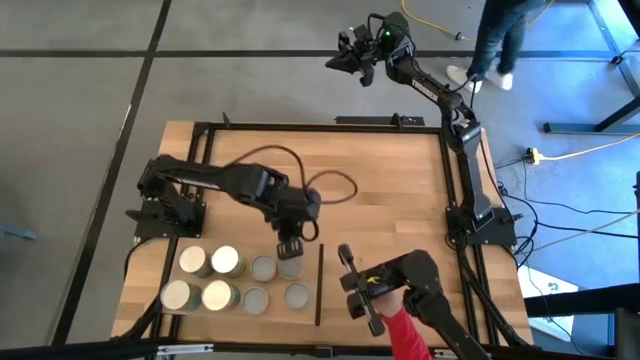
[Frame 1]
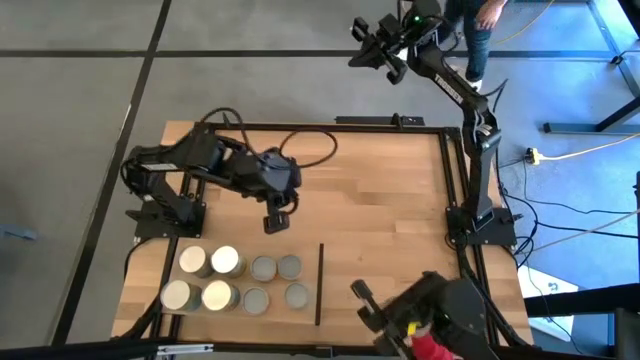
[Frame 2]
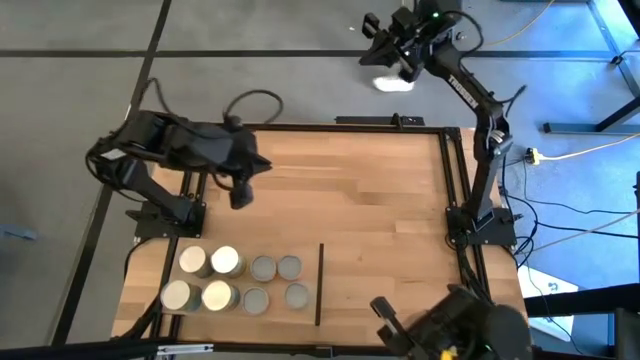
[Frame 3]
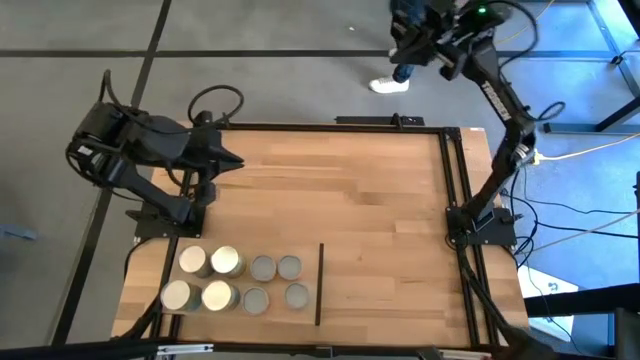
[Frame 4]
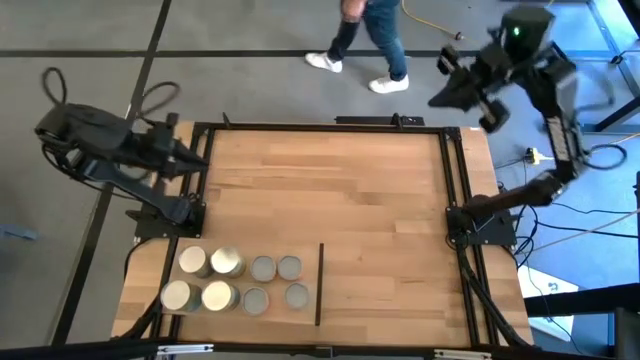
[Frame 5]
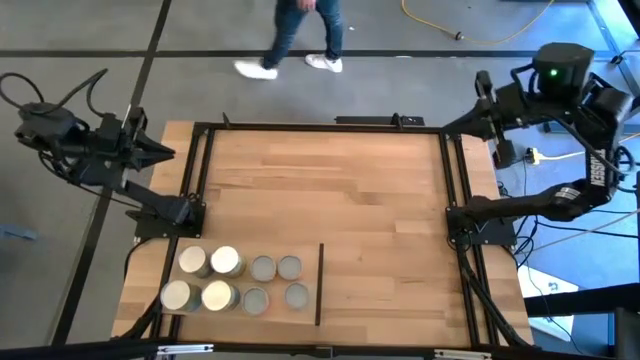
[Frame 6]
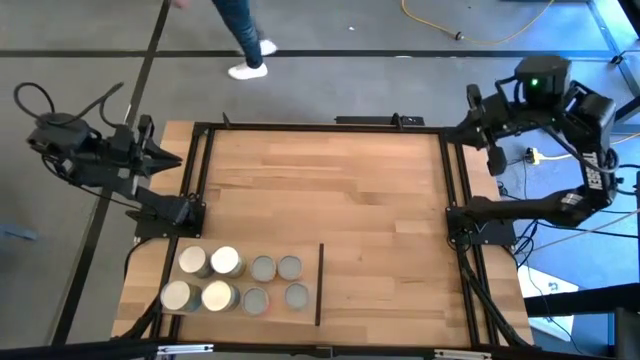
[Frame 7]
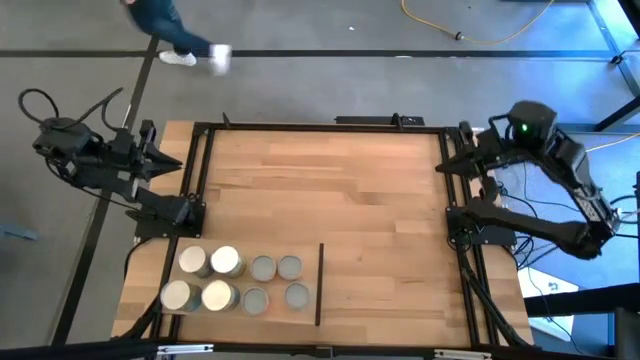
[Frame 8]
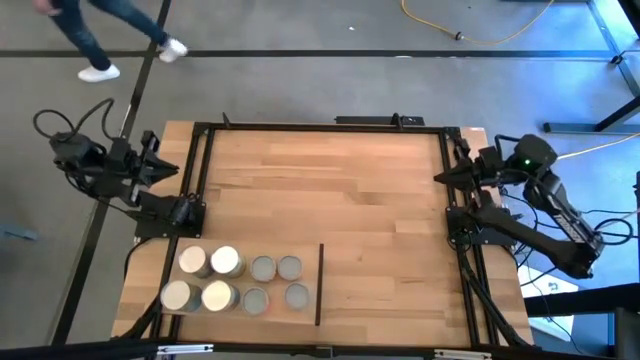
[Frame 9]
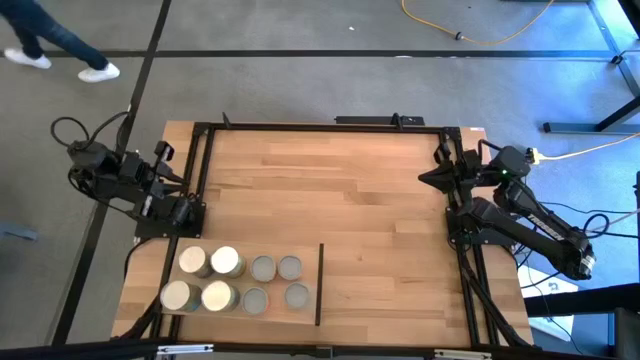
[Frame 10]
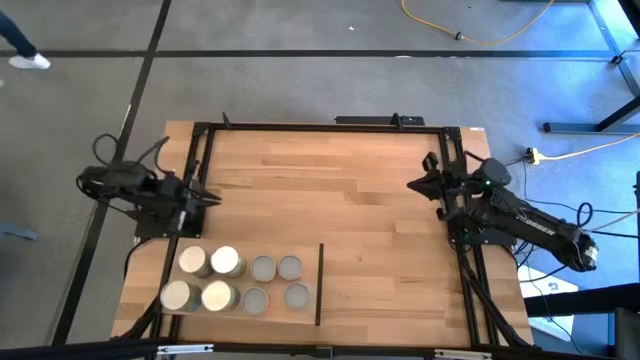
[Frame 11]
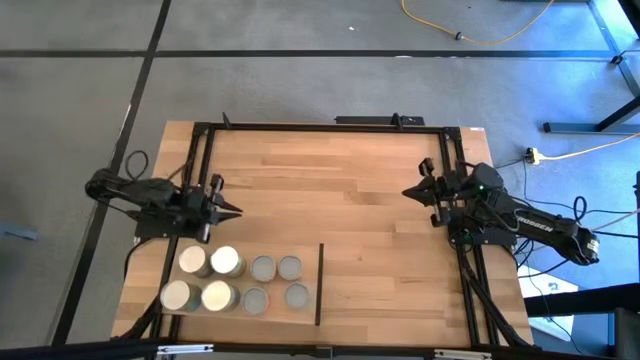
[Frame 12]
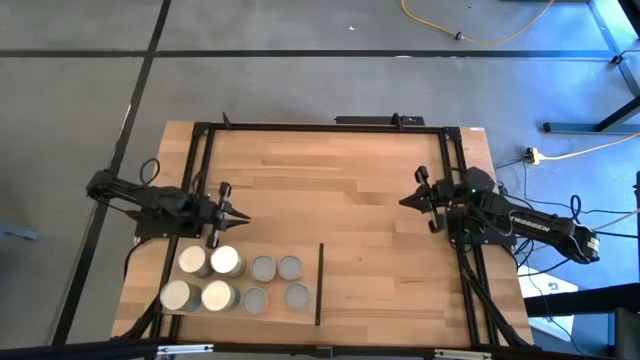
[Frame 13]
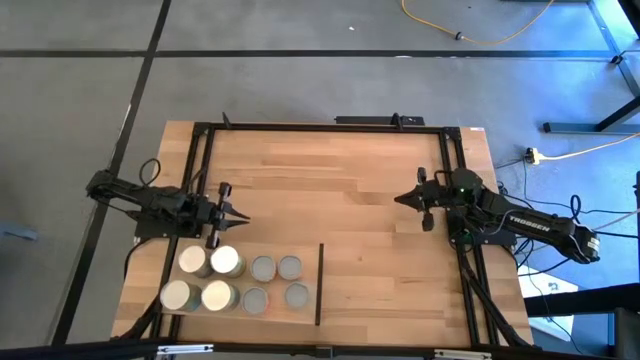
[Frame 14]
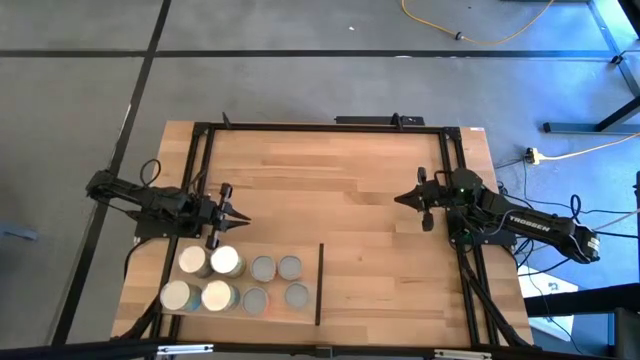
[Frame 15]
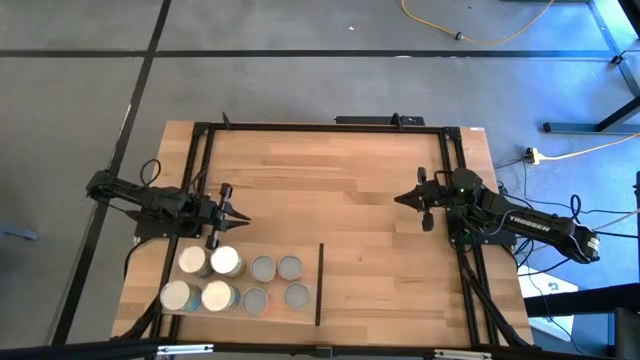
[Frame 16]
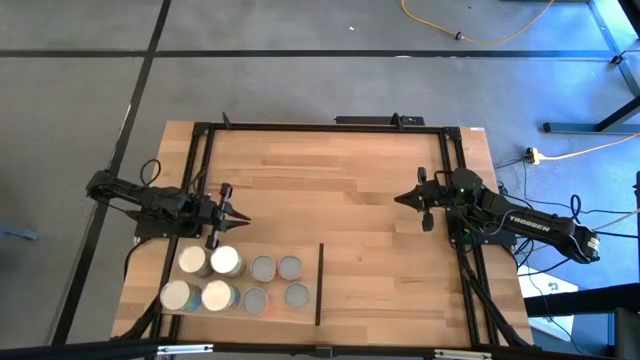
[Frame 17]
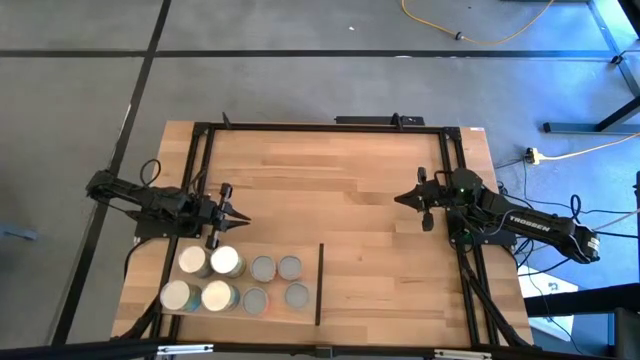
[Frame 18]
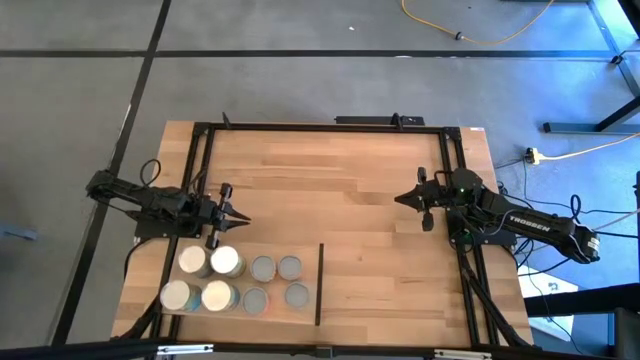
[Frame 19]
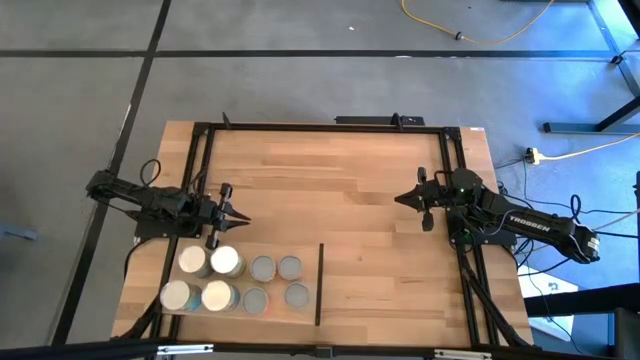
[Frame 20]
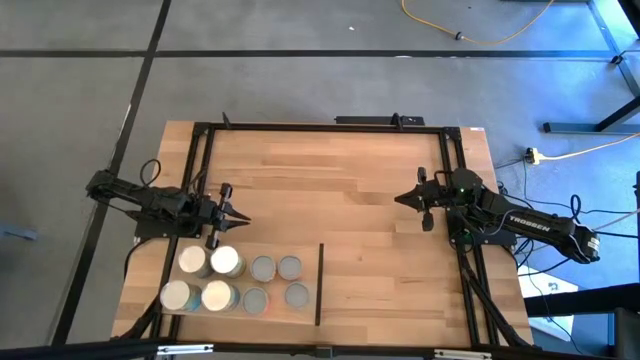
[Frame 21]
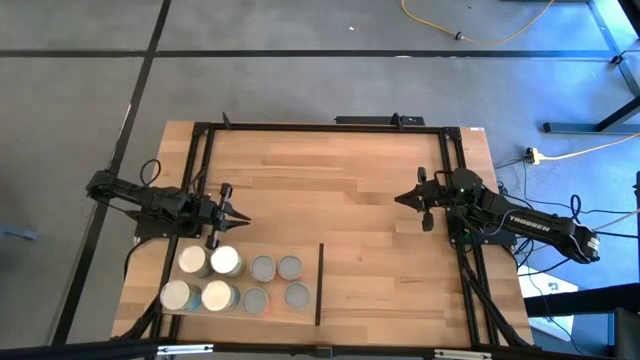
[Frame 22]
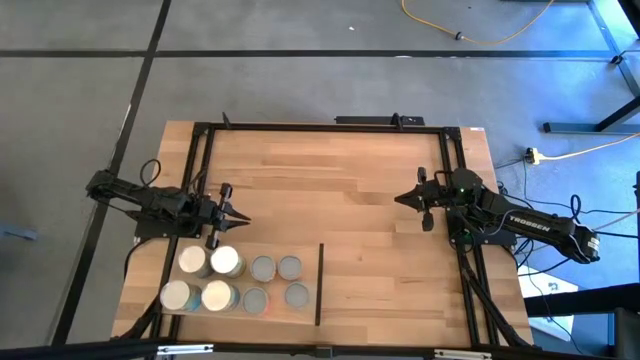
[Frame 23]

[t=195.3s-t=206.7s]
Task: Pick and place cans onto a shelf
Return to Home Position

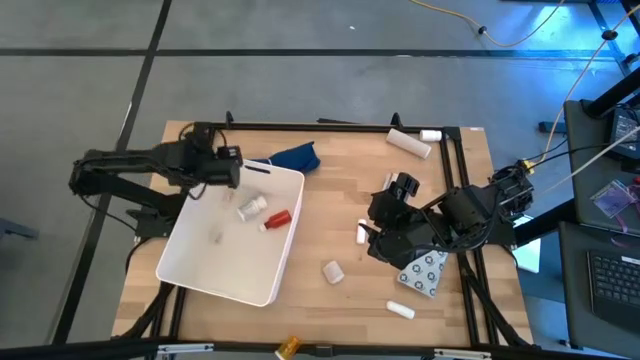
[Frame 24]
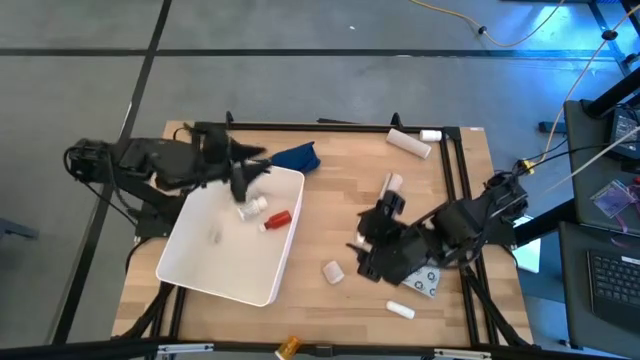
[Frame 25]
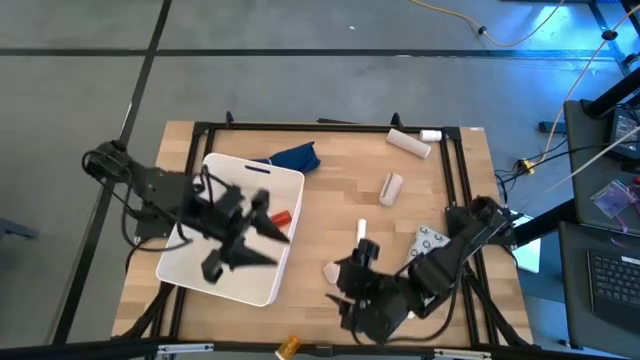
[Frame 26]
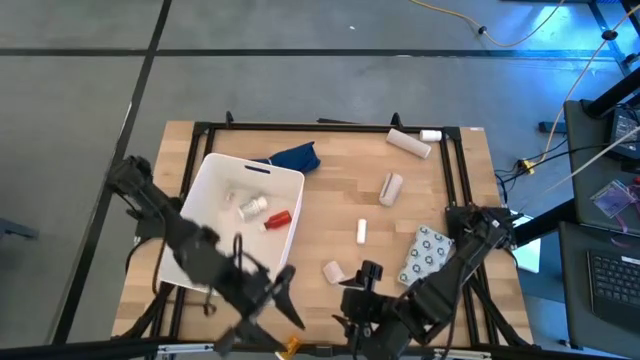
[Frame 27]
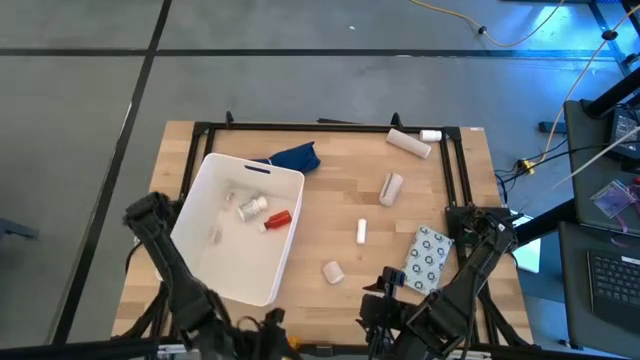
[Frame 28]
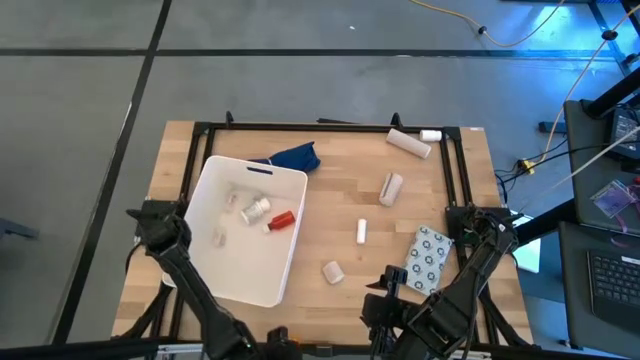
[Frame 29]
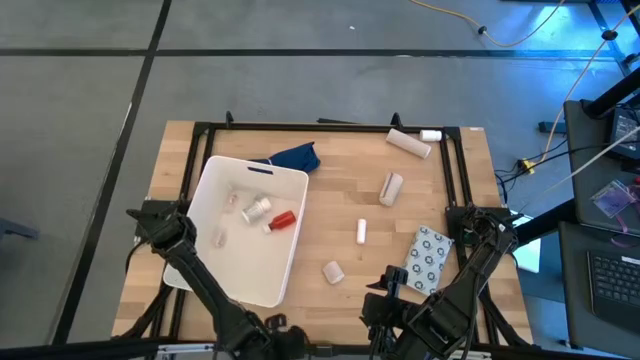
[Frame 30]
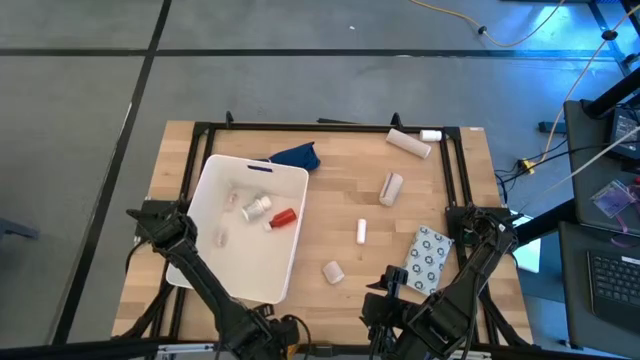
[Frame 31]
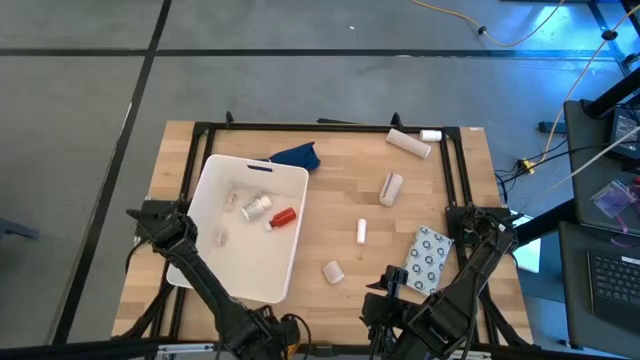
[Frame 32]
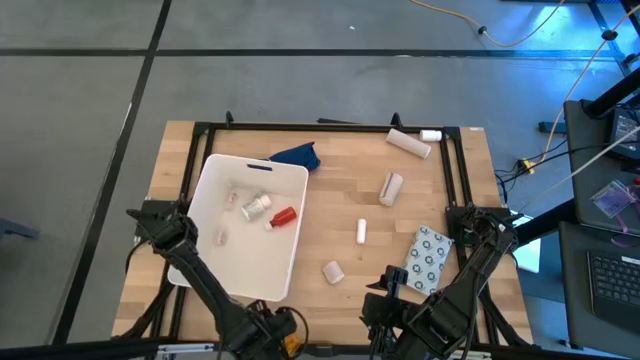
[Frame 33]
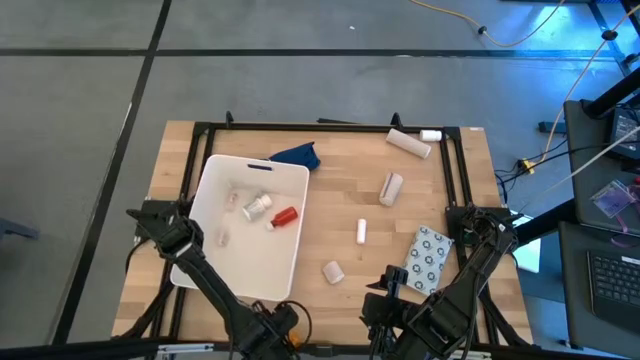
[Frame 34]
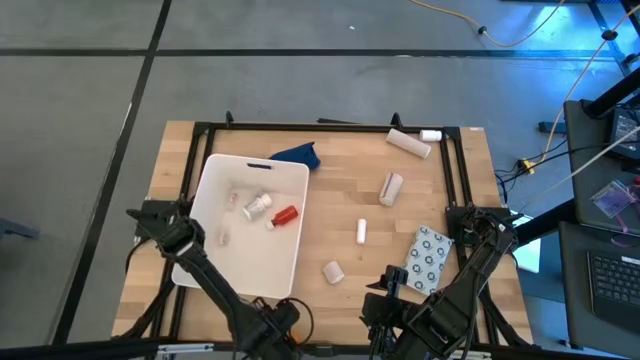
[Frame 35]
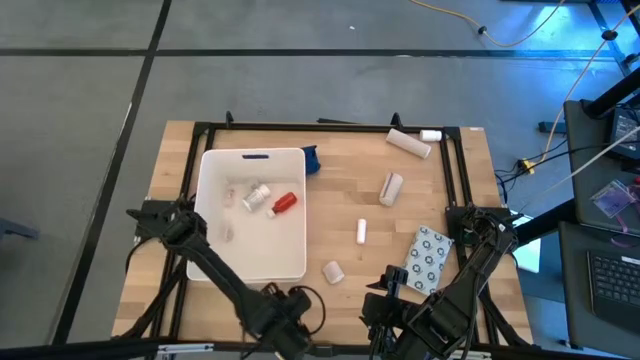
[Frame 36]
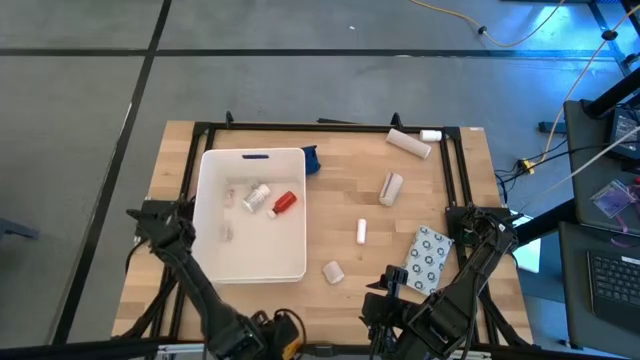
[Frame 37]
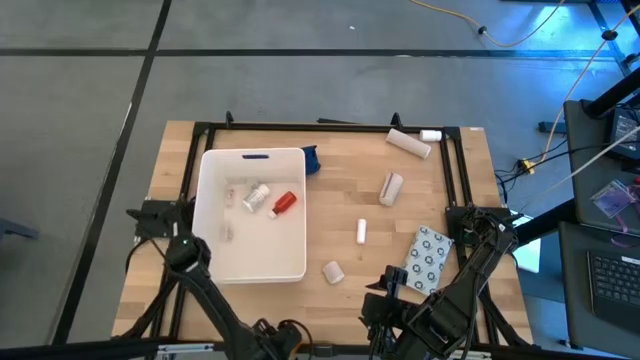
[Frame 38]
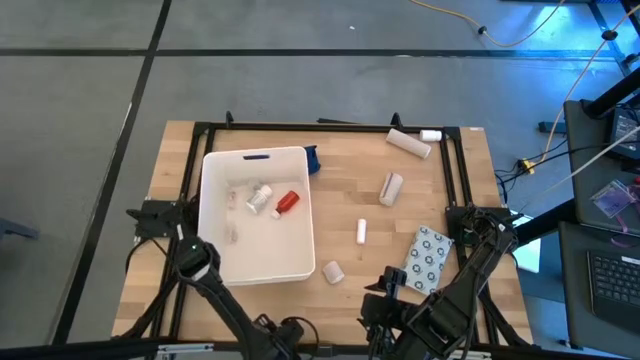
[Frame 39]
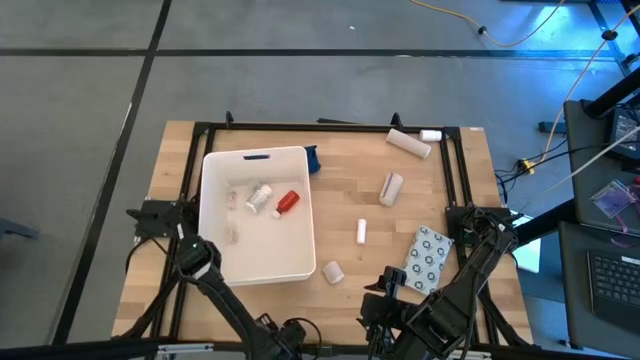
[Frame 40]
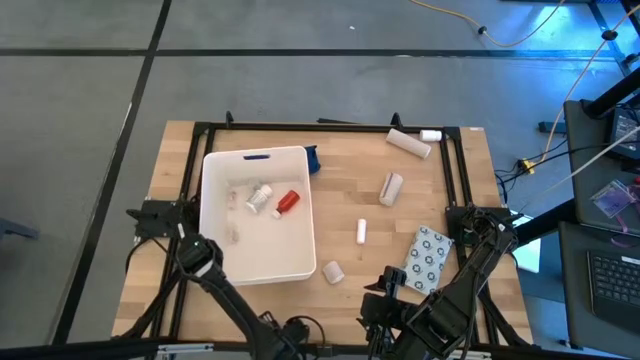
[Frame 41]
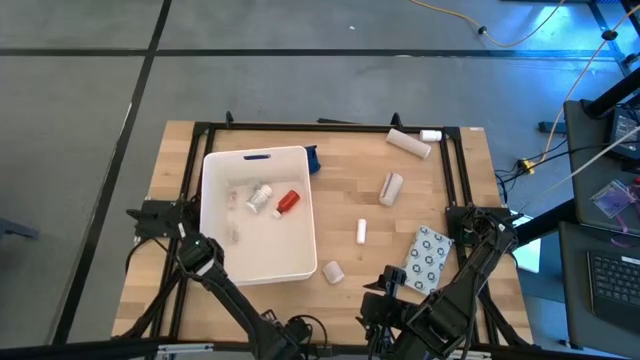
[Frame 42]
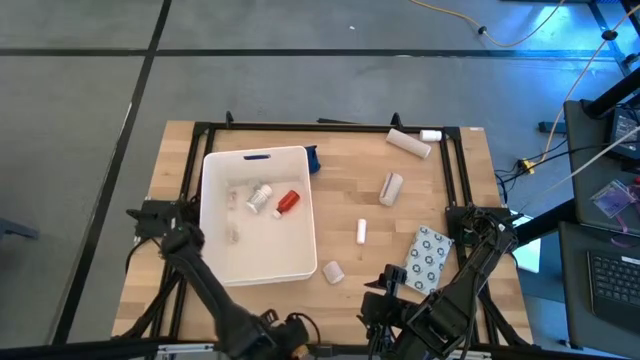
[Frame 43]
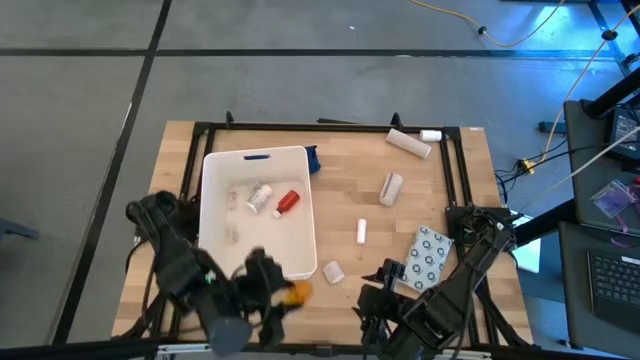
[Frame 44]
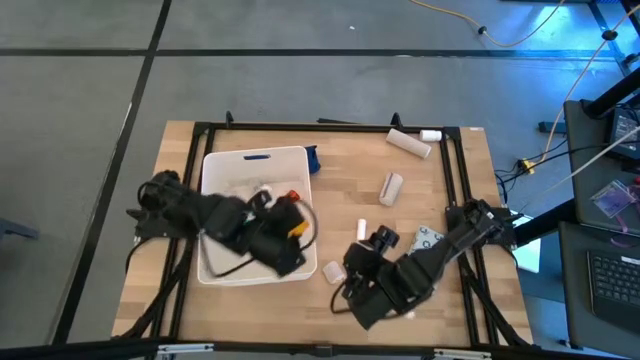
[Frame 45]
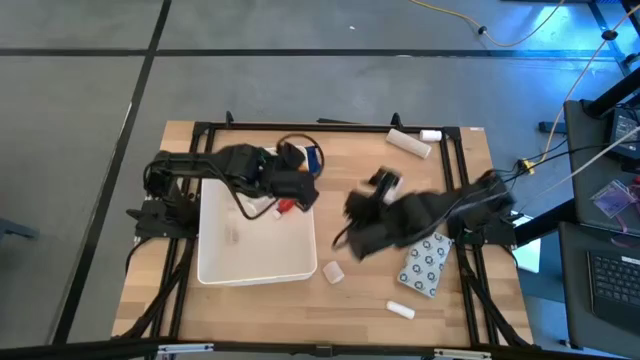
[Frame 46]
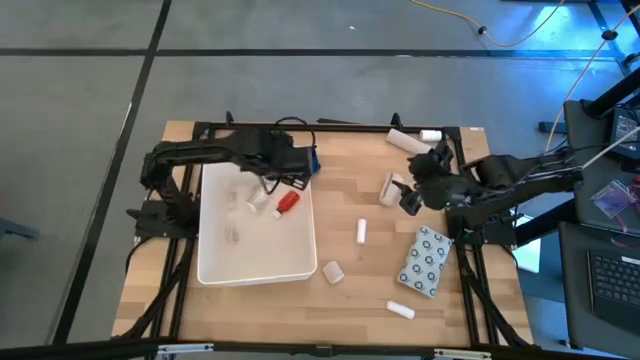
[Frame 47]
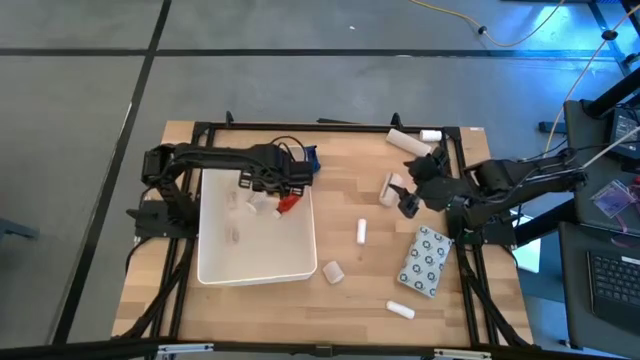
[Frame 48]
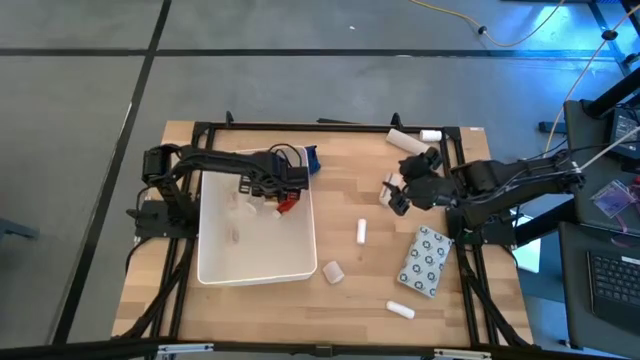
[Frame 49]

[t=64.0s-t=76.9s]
Task: Pick & place medical supplies in basket/bin
Put the orange medicine bottle into the white bin
